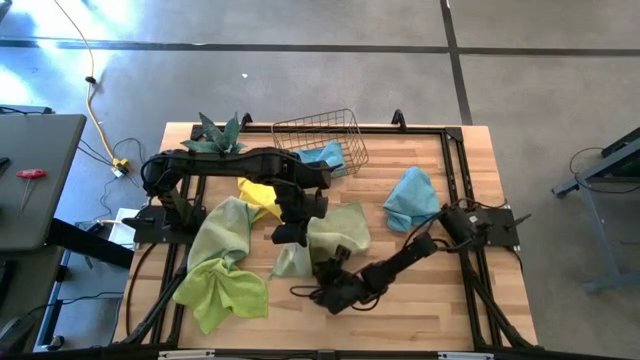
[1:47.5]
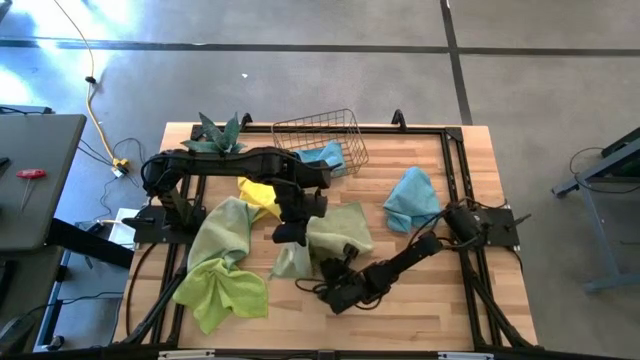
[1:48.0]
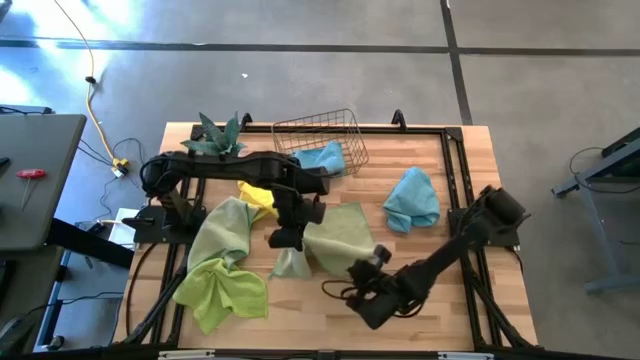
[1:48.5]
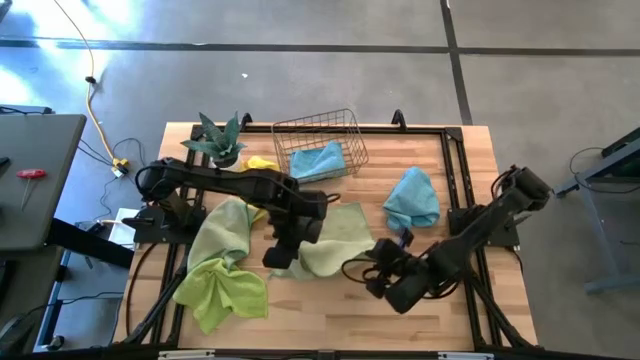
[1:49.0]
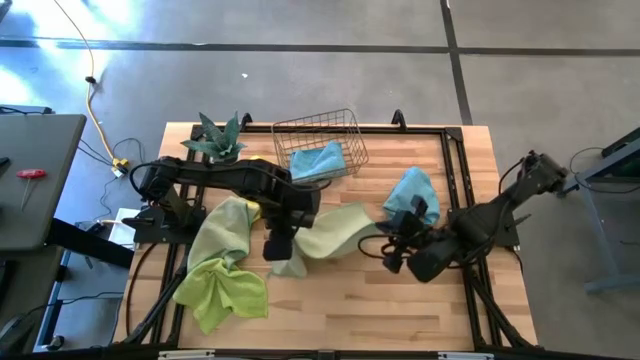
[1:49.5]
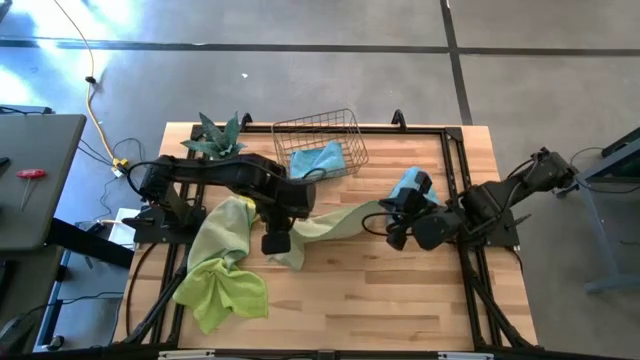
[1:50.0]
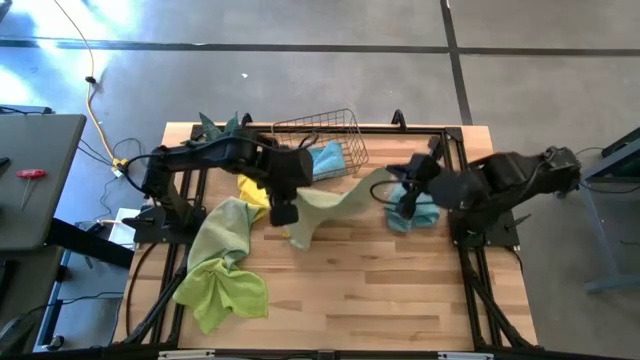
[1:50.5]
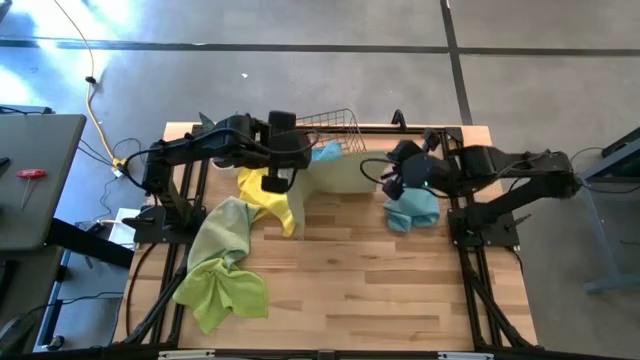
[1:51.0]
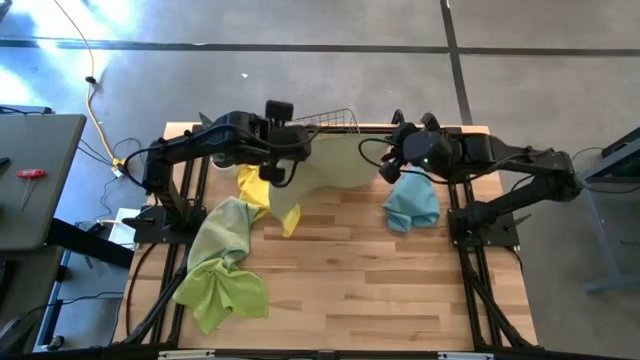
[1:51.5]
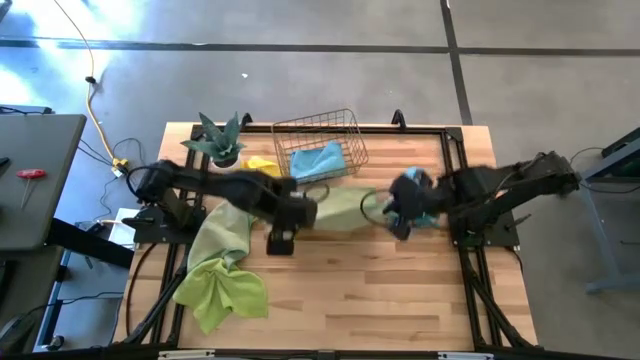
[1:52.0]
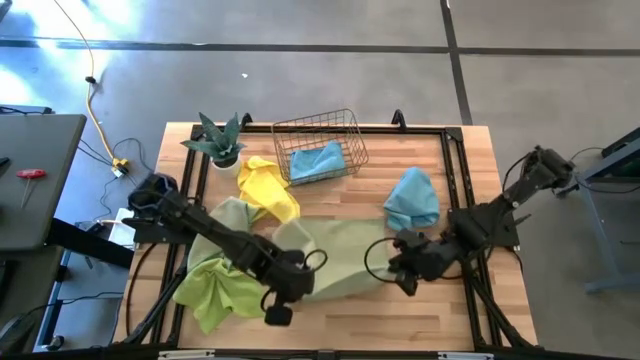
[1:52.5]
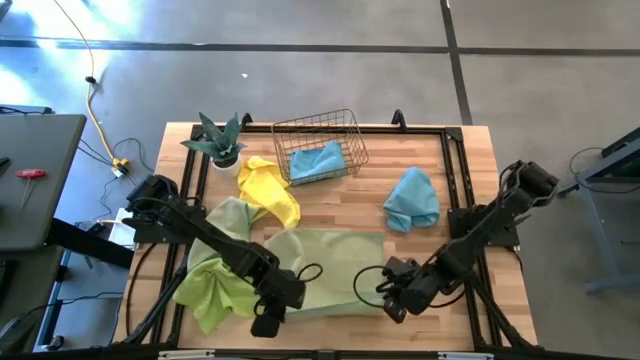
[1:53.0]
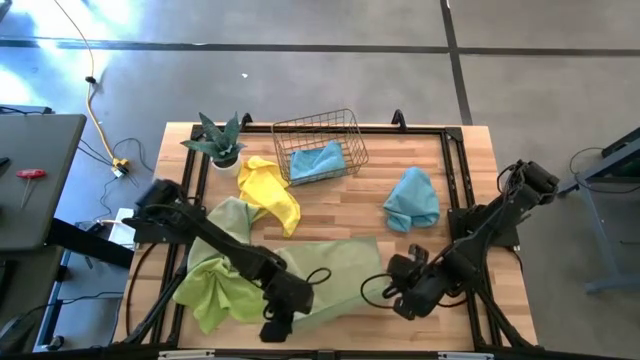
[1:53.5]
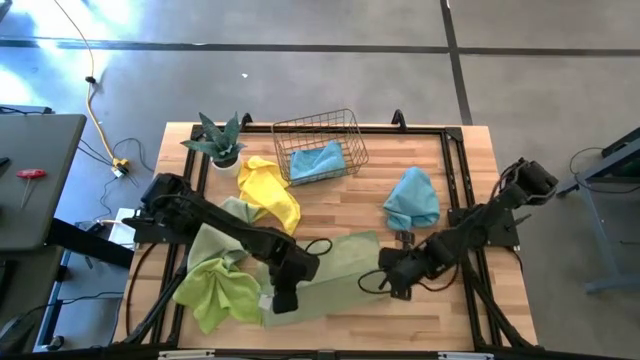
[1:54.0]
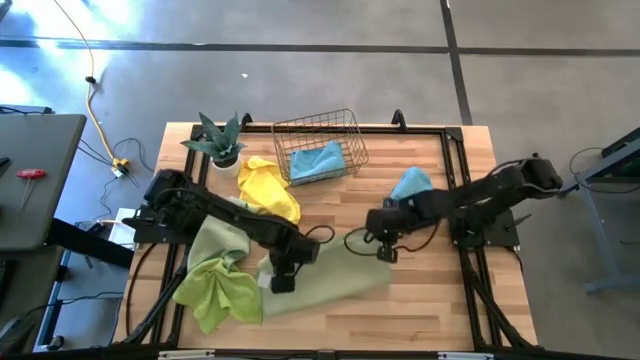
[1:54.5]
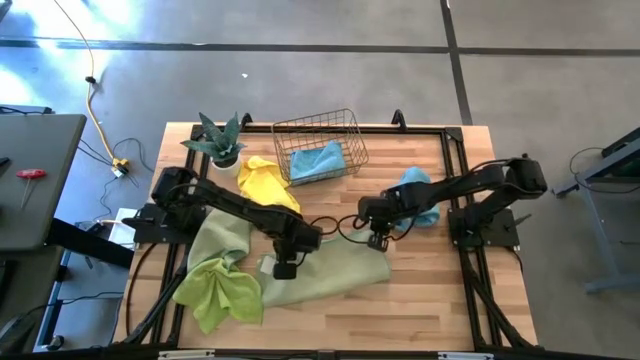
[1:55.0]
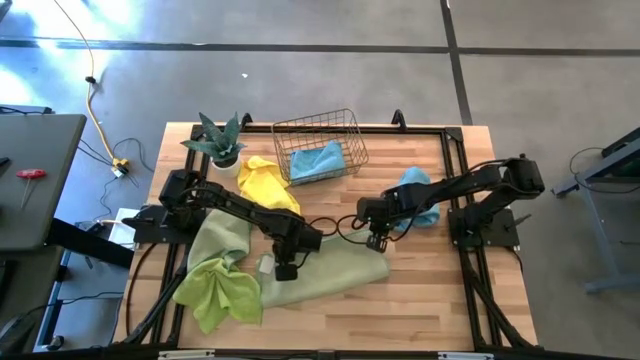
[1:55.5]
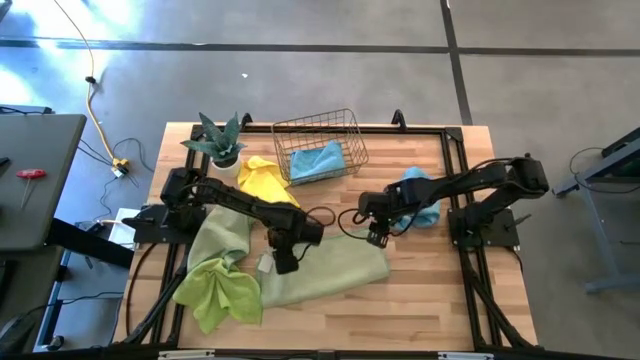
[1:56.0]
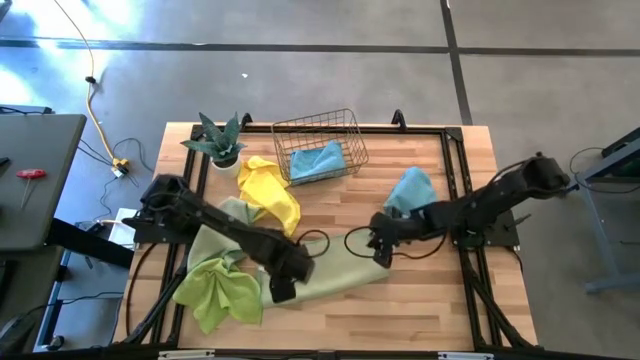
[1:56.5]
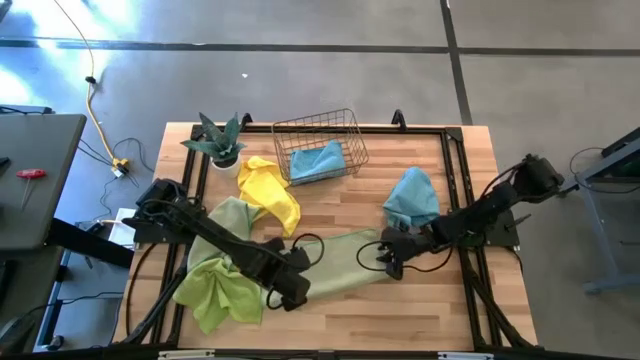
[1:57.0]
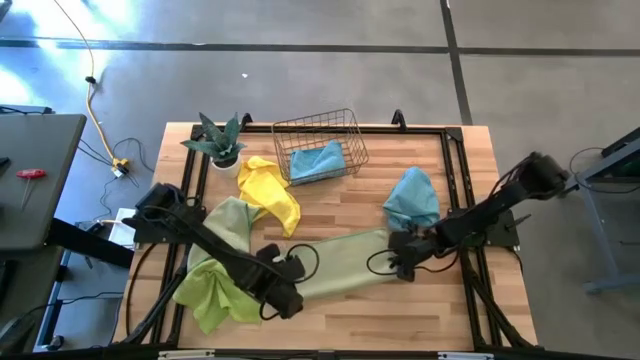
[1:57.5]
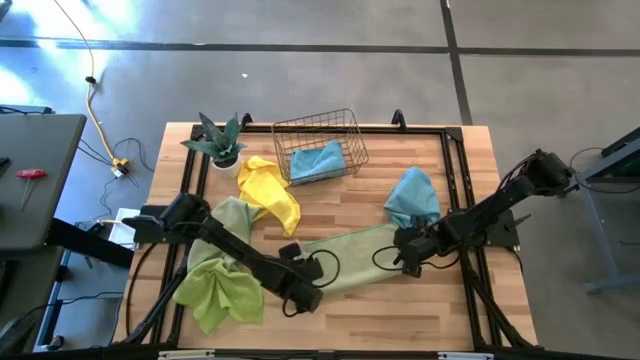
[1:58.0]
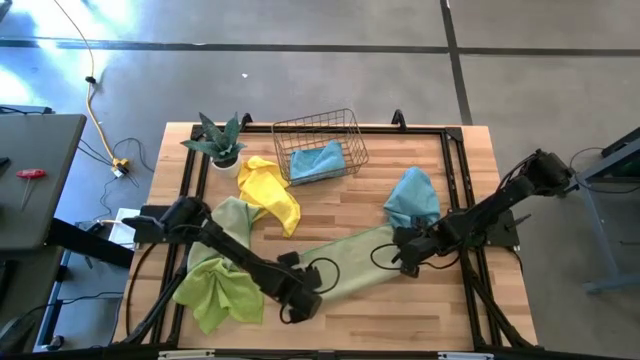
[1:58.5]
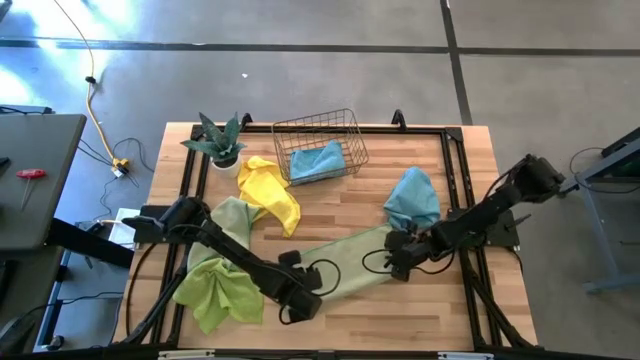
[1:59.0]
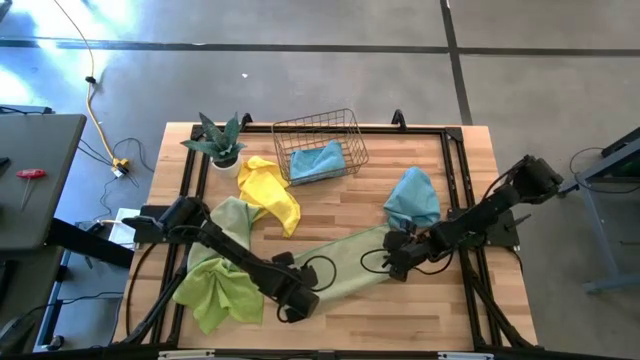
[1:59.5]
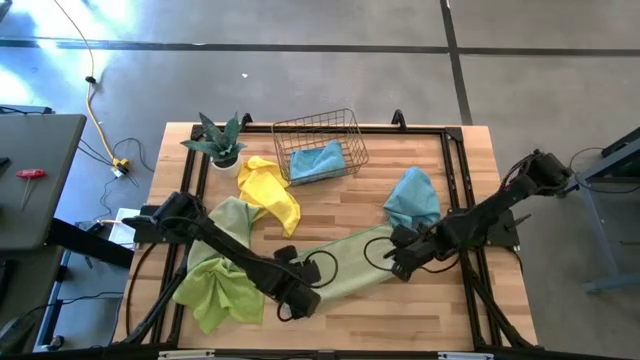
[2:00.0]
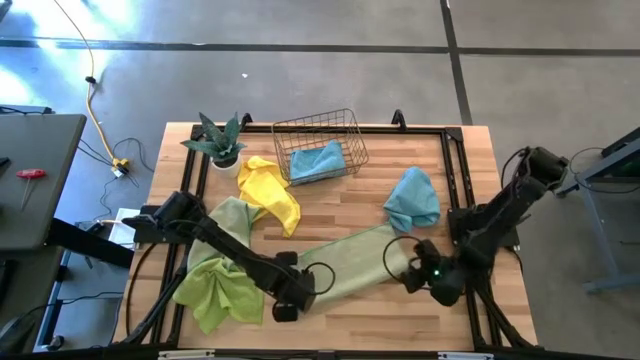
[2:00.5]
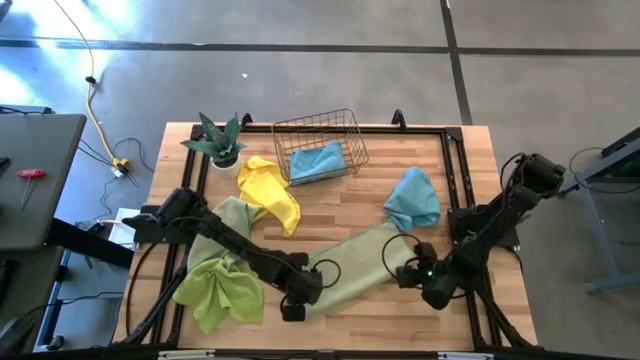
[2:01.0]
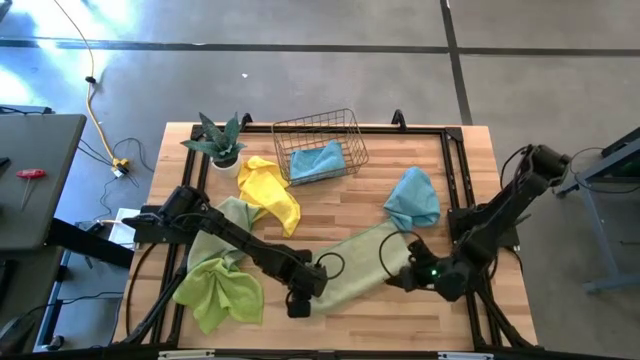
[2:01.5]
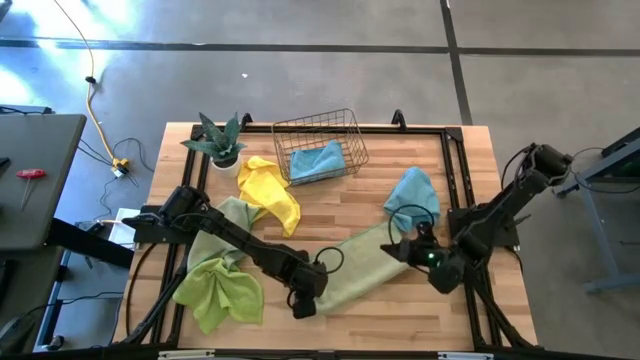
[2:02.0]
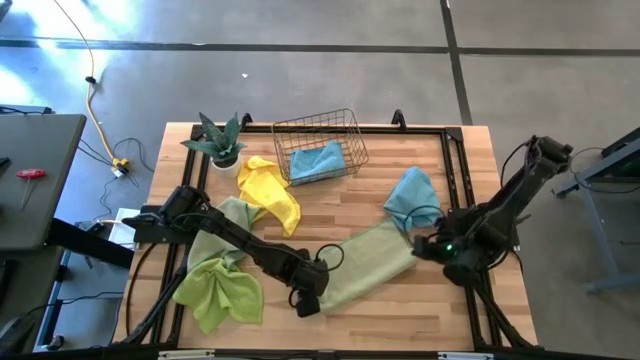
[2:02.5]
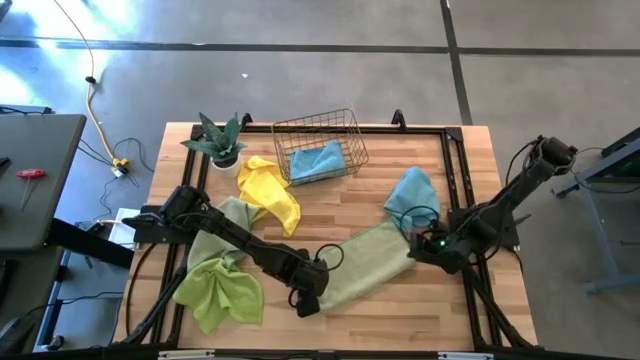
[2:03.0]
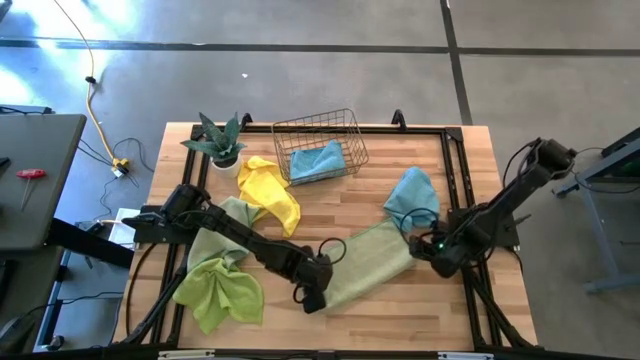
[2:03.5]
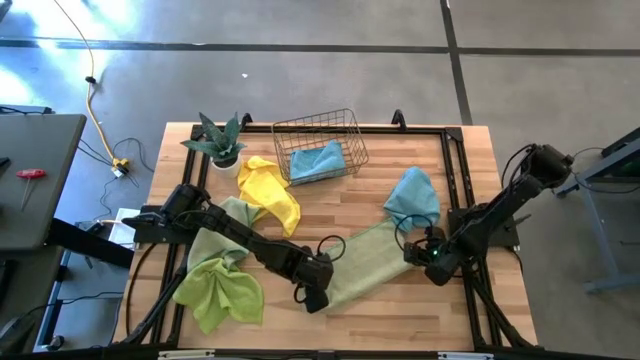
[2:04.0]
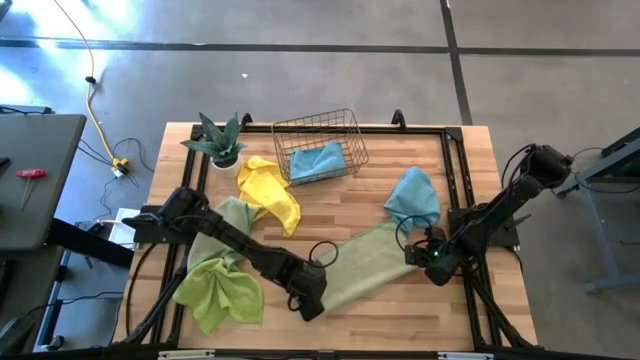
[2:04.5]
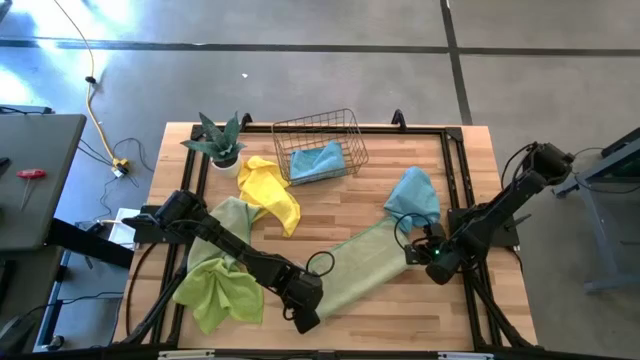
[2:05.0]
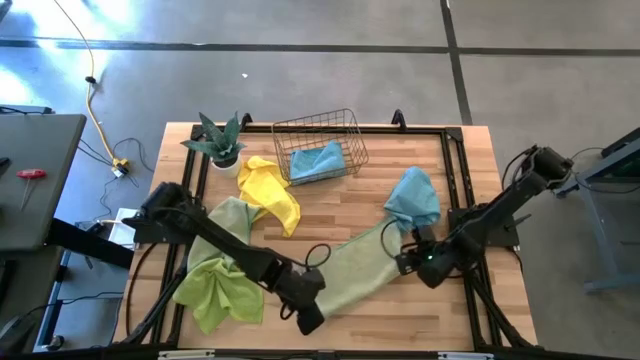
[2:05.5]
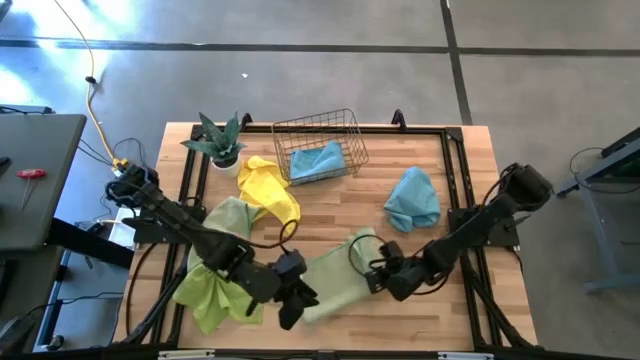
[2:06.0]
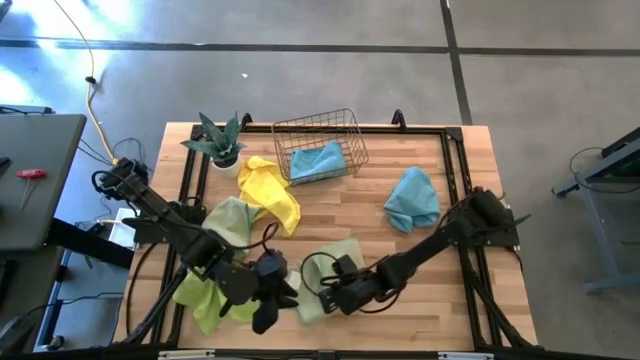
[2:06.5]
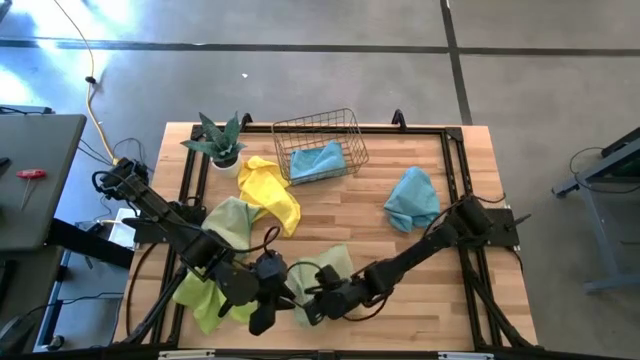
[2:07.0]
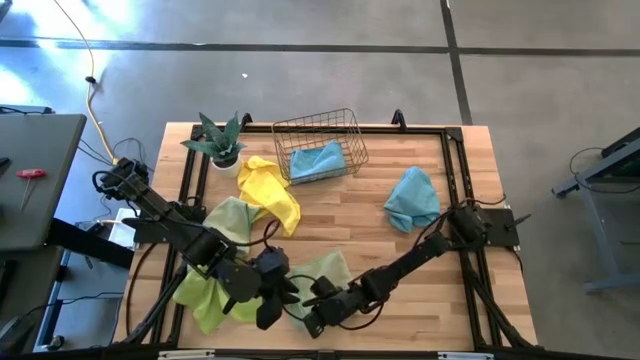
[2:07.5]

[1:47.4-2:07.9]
Task: Fold microfiber towels
Fold the right light blue microfiber cloth

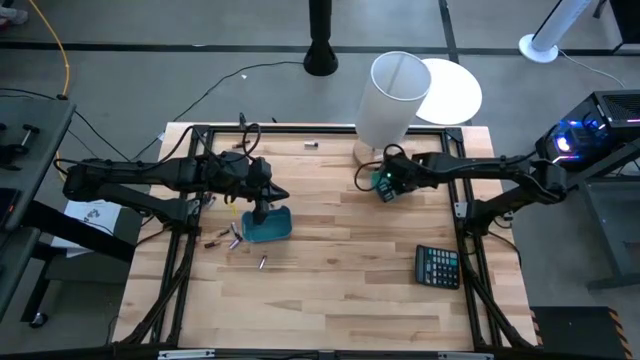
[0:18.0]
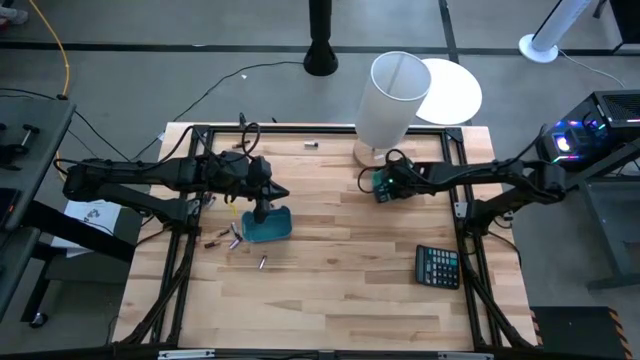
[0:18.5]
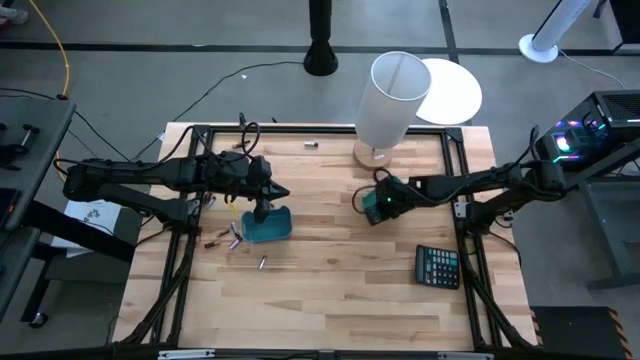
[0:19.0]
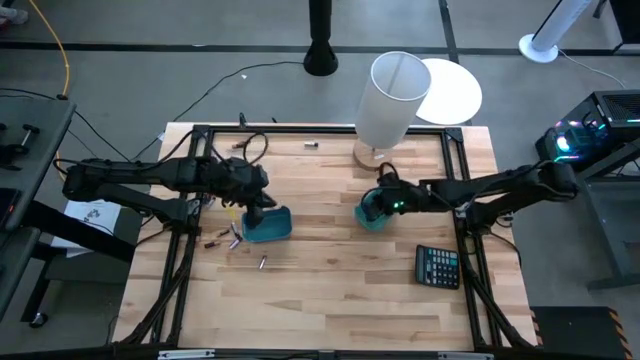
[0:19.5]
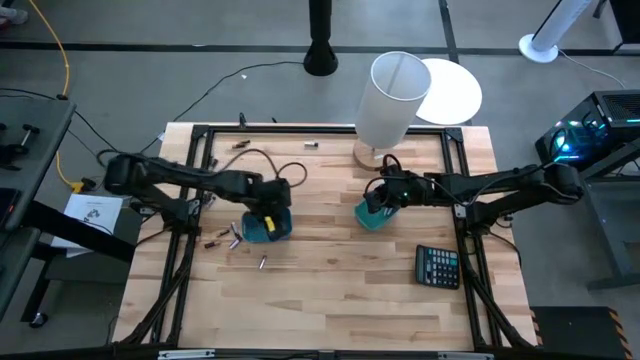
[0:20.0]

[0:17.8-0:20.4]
Task: Sort batteries
Adjust the bins to the center of the table
